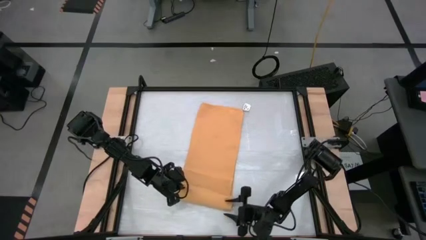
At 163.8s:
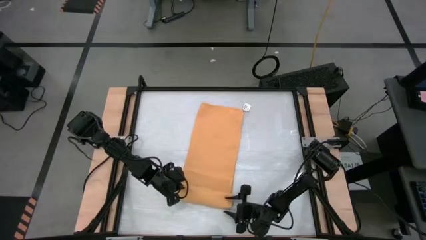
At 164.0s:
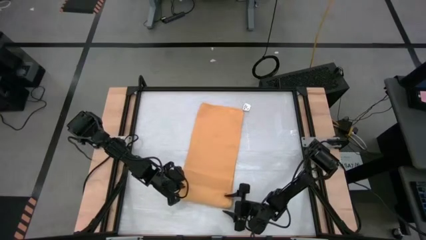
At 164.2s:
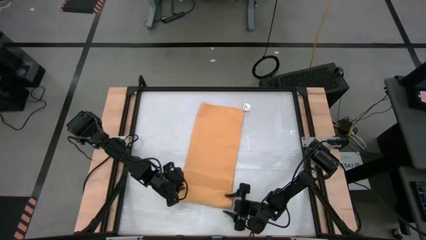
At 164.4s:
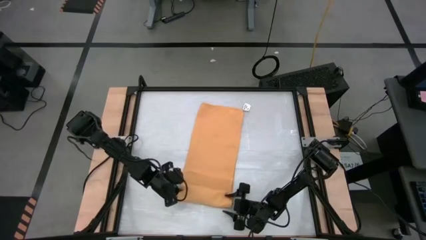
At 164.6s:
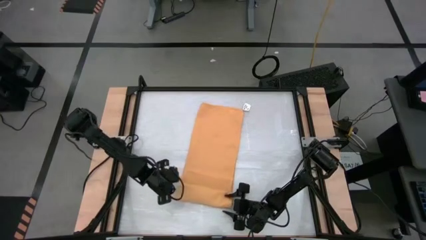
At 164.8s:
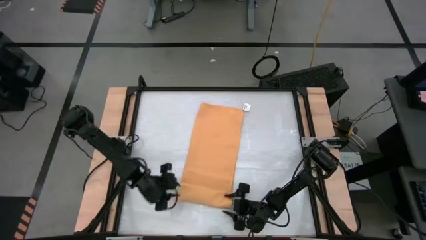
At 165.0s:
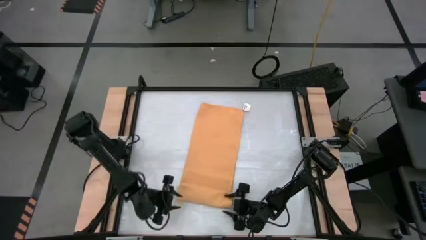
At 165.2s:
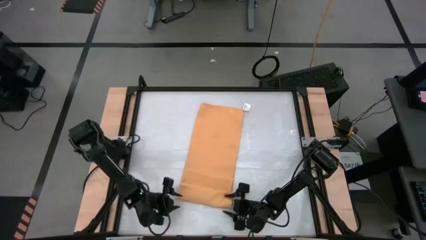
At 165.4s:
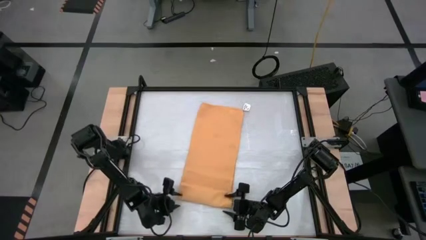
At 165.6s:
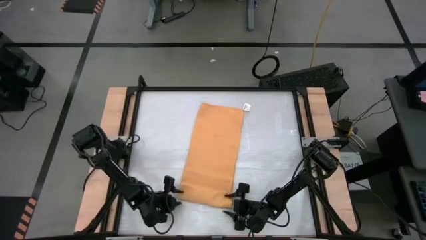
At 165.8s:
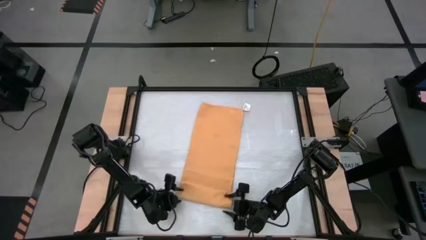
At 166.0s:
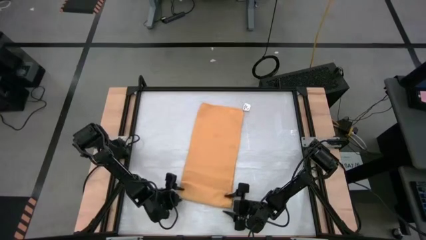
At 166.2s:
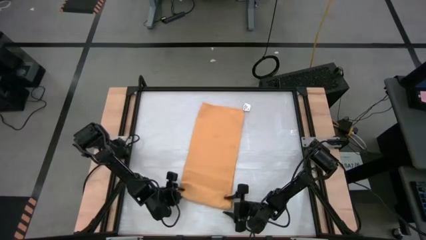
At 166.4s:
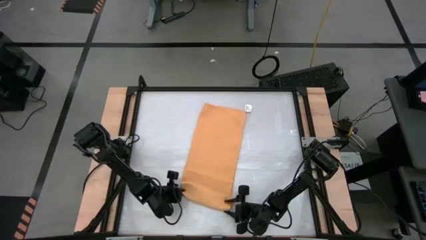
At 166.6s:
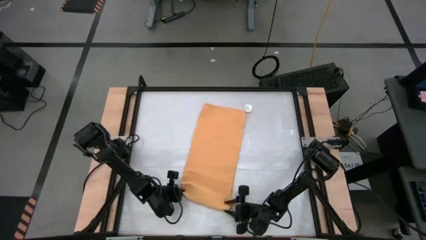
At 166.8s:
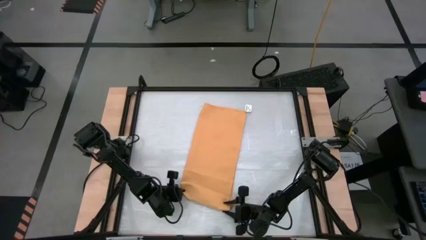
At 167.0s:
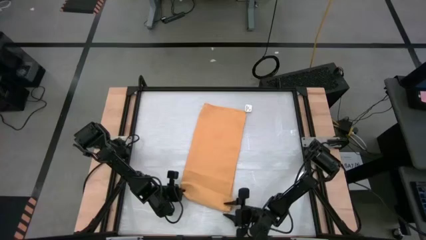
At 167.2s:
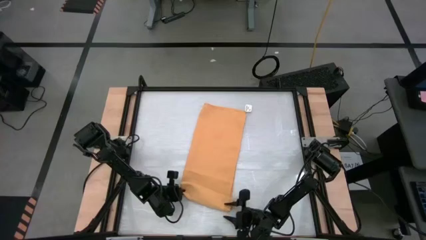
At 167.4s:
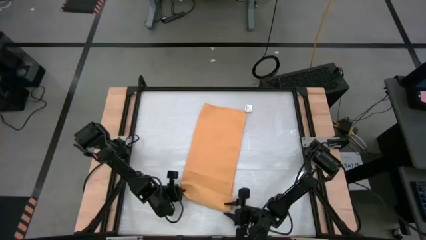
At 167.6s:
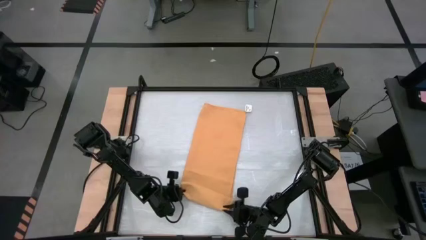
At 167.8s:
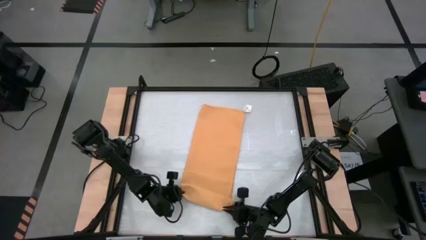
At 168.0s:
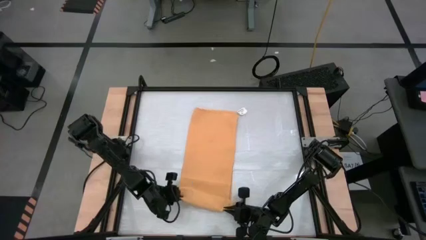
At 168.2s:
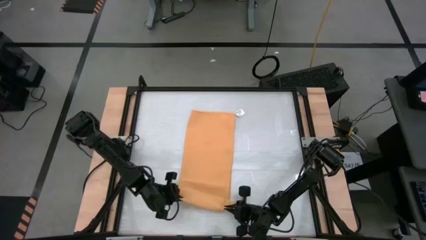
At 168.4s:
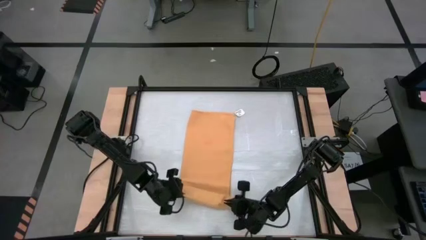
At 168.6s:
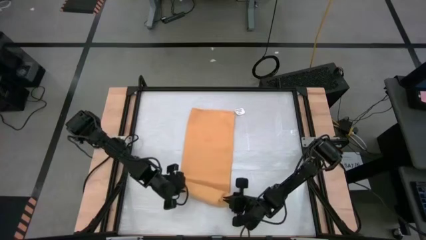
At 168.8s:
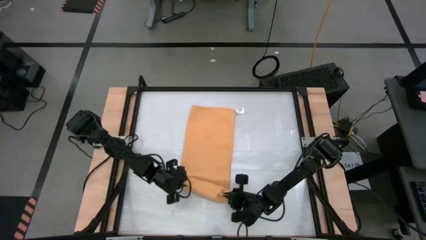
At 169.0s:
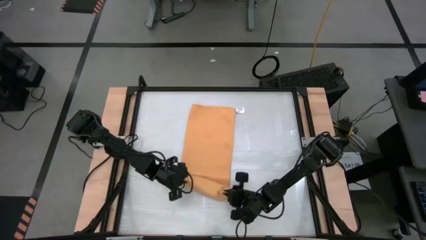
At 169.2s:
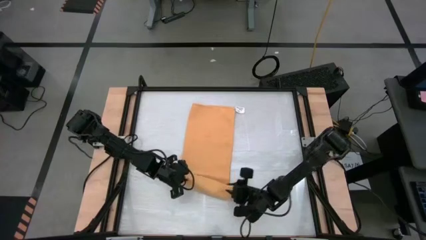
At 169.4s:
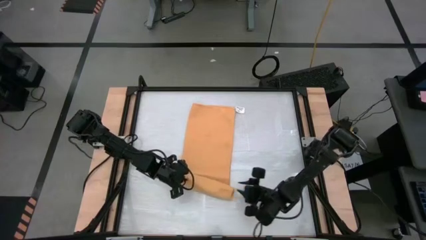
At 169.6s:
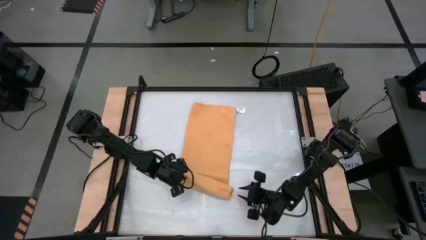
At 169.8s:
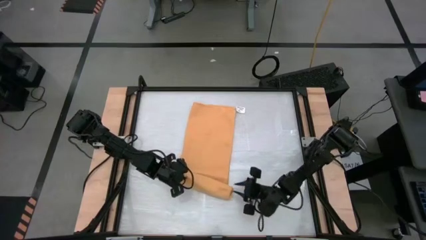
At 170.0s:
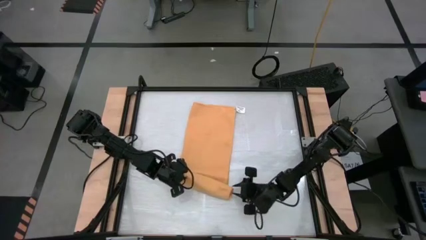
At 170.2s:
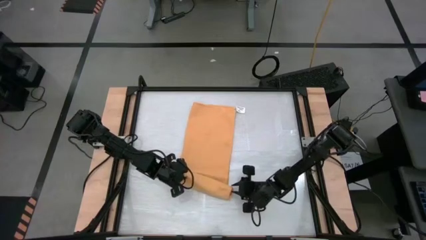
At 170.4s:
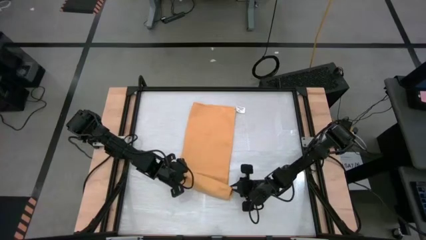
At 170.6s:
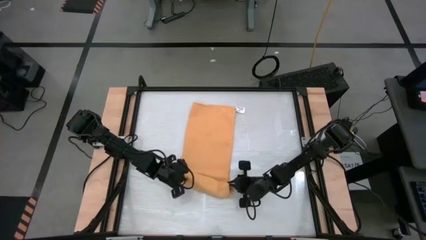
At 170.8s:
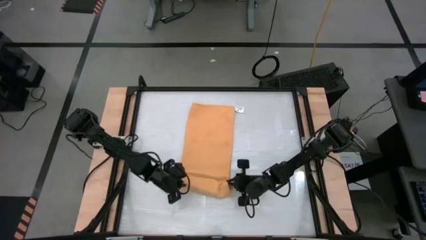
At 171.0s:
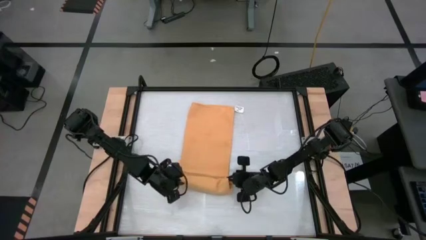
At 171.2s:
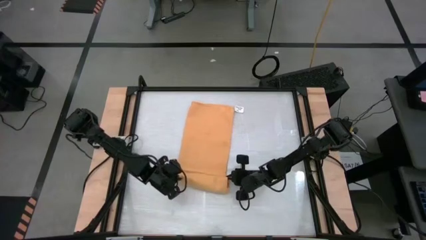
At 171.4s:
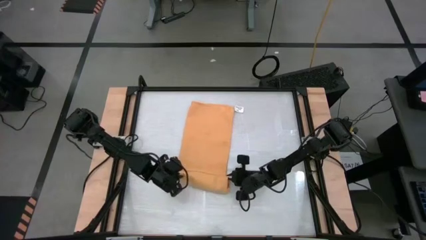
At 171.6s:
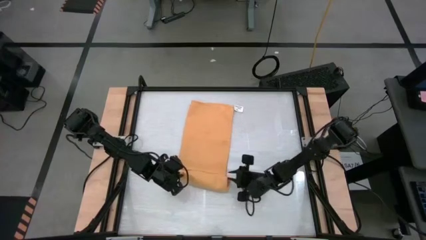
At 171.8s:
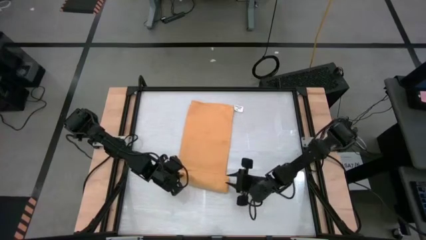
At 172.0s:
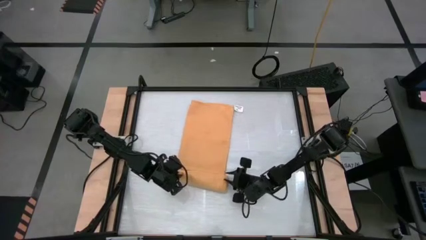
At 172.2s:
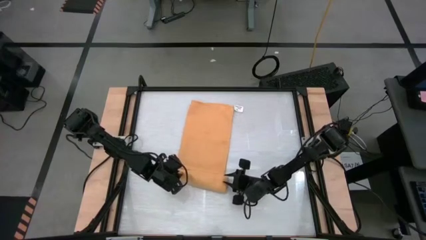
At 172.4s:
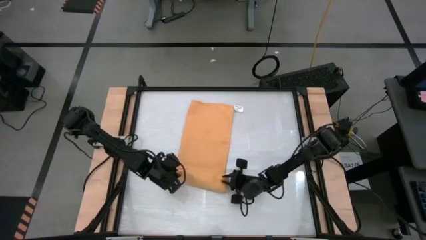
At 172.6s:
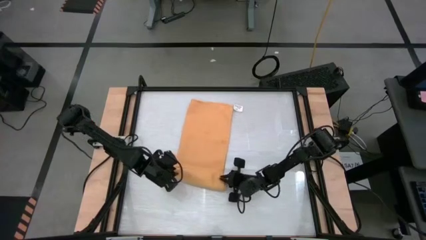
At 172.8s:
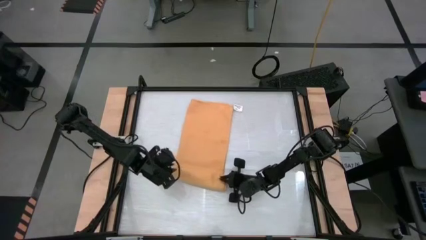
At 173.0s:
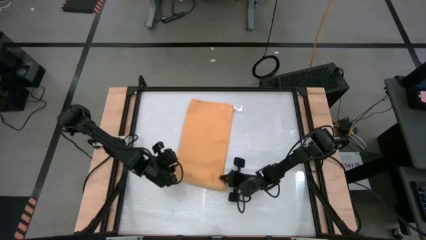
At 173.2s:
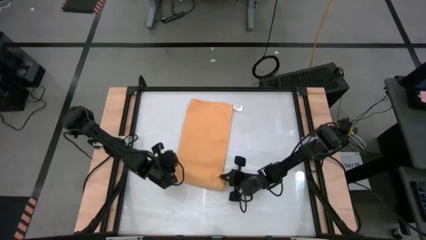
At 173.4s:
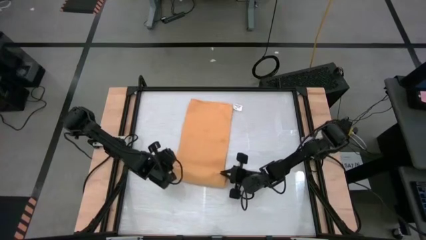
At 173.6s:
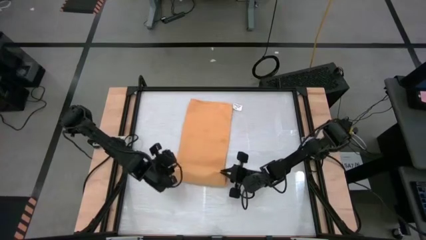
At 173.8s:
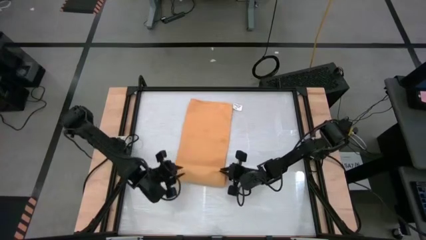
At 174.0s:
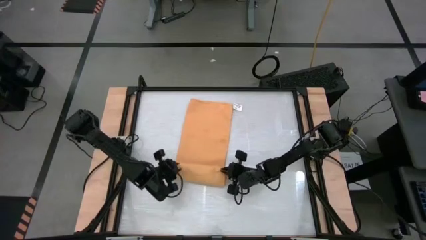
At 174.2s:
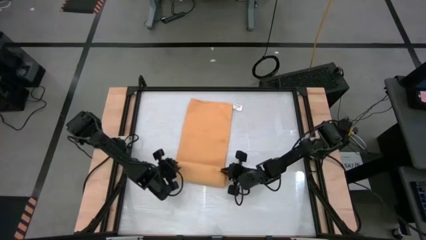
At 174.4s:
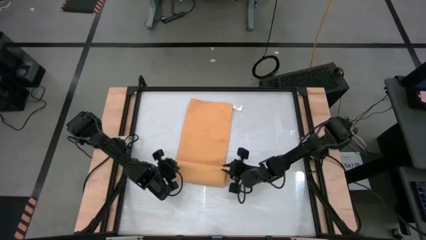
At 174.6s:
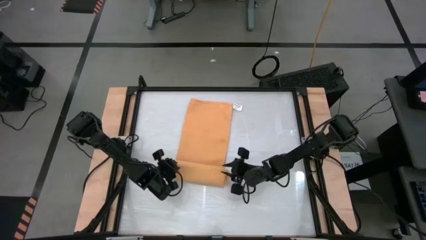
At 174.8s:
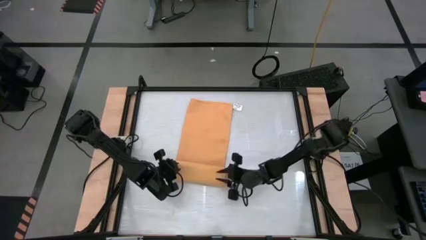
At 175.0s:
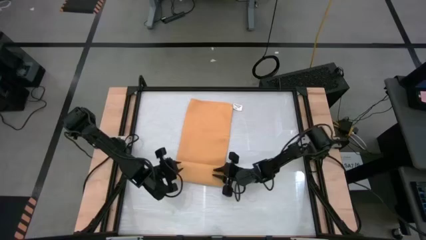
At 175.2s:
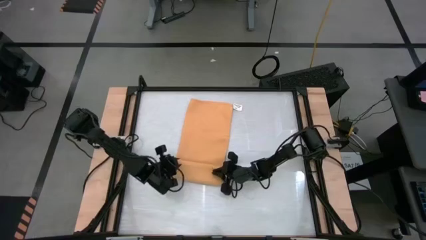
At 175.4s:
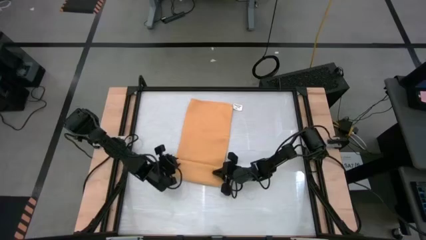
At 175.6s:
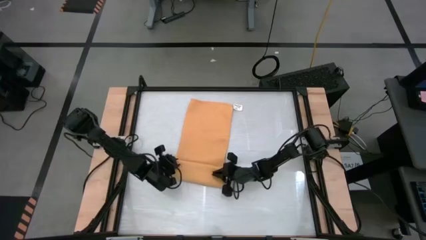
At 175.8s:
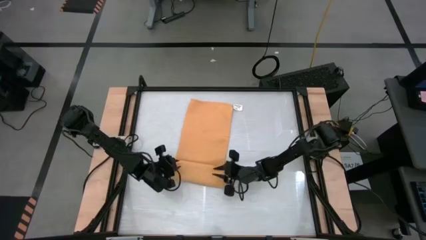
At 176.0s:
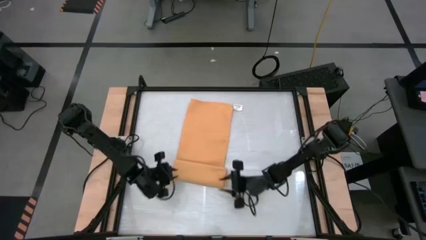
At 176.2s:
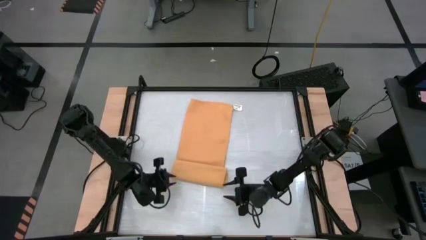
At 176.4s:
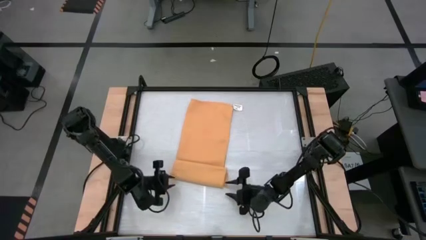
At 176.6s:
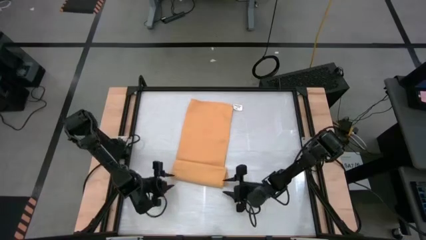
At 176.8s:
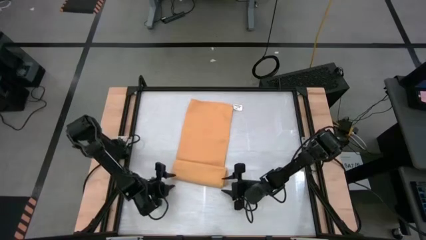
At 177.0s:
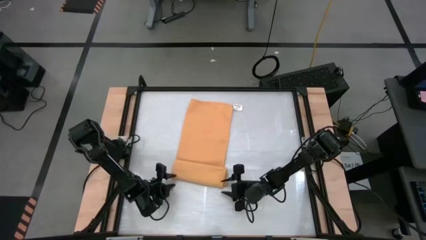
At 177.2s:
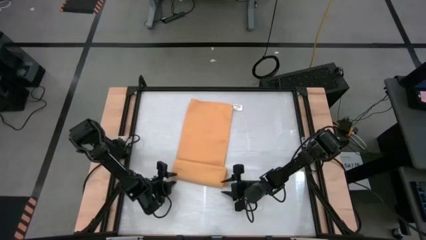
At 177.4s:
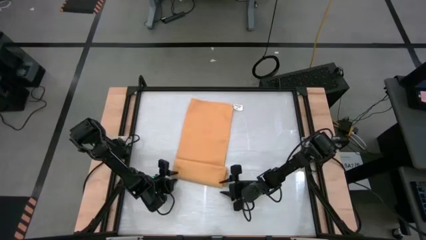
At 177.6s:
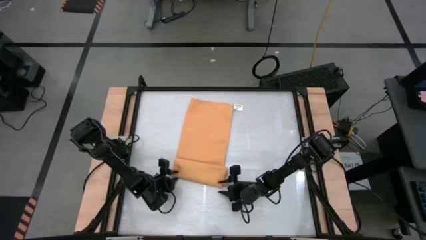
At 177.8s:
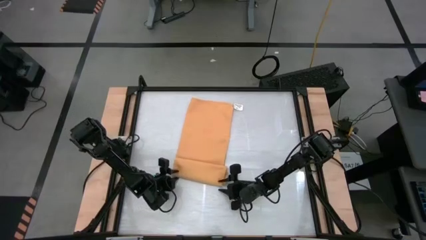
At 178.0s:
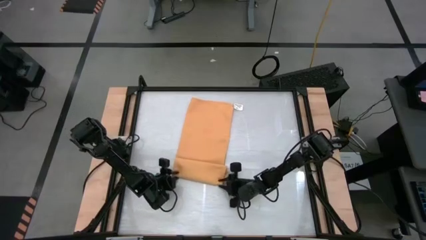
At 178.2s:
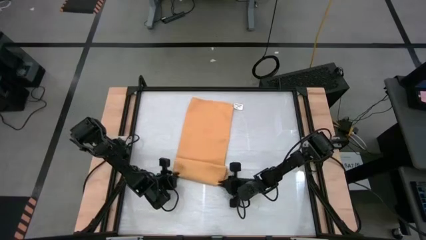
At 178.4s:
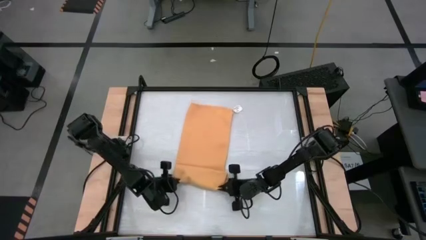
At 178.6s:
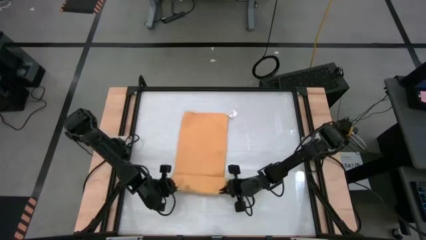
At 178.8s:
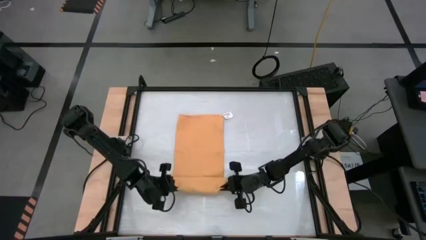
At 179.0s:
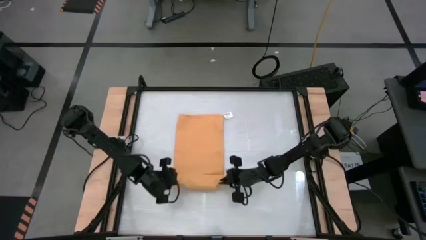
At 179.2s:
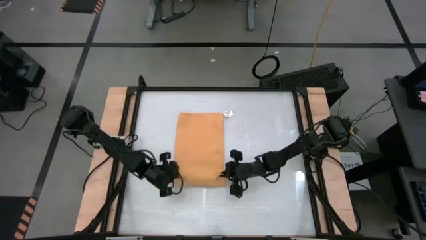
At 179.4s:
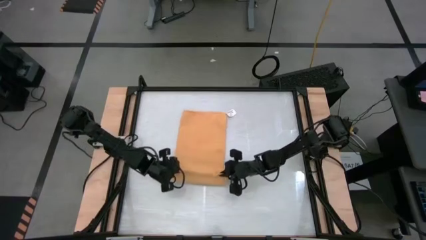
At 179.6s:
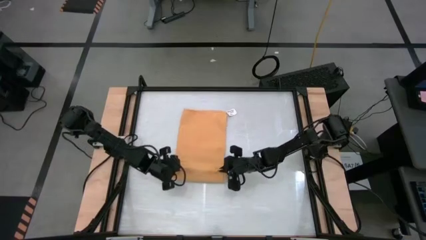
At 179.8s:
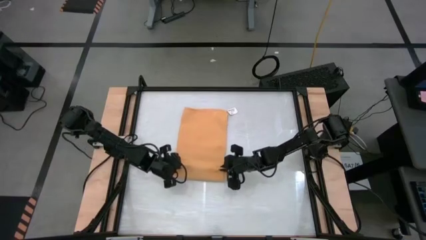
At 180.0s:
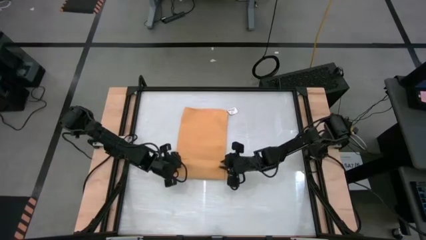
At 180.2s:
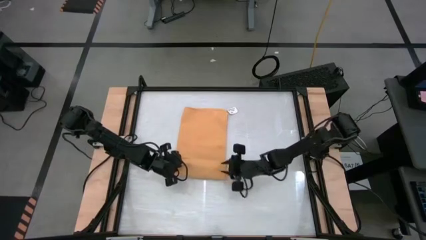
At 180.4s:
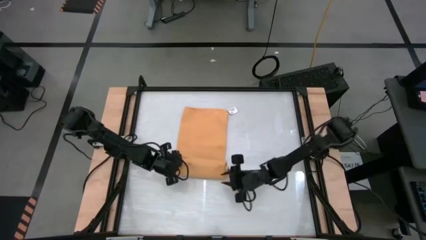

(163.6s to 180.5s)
Task: Roll towel into tight, uniform cylinder
Roll the yellow towel
